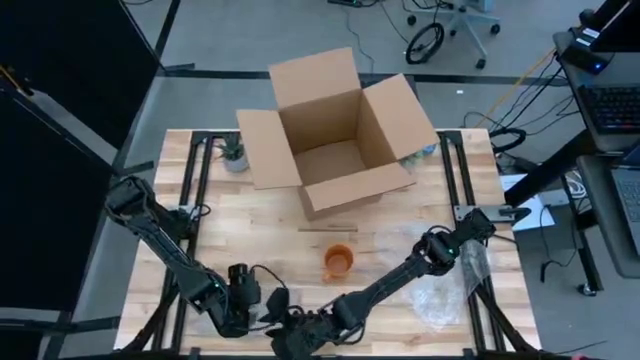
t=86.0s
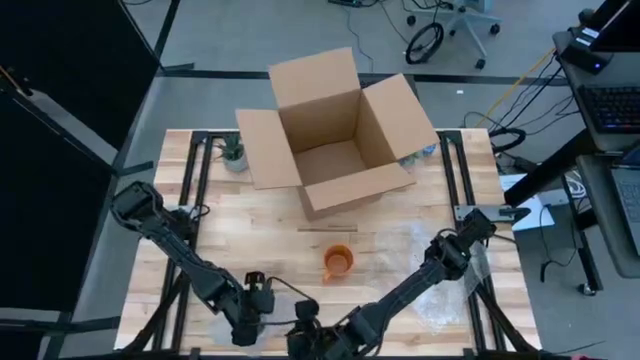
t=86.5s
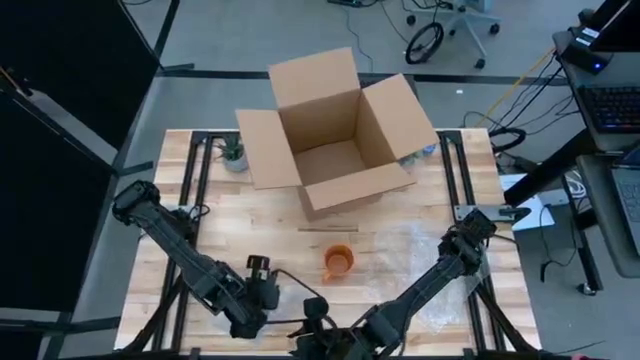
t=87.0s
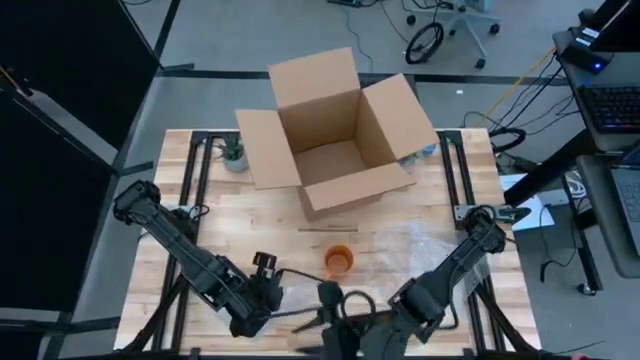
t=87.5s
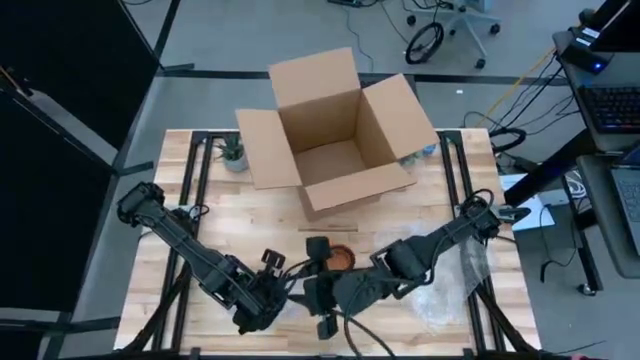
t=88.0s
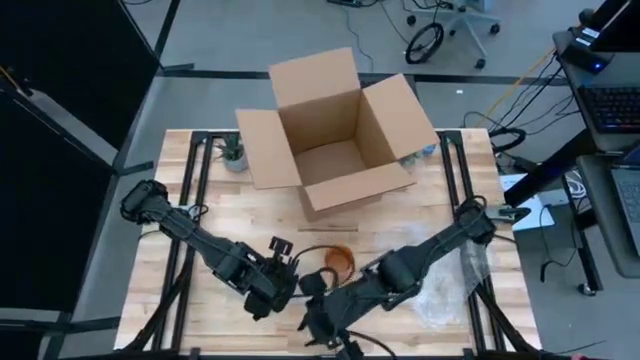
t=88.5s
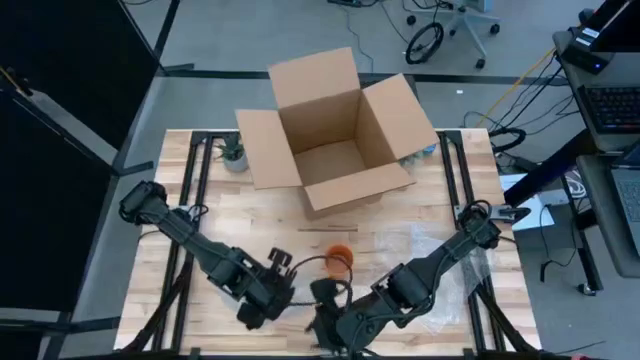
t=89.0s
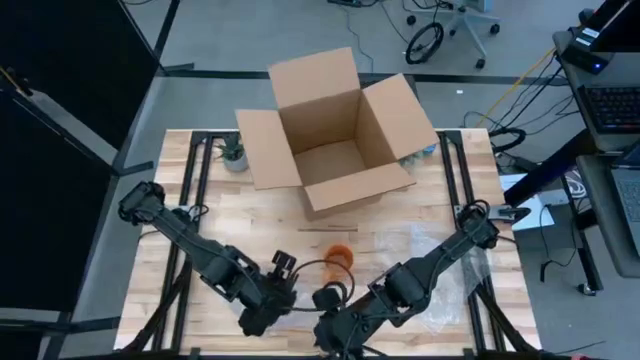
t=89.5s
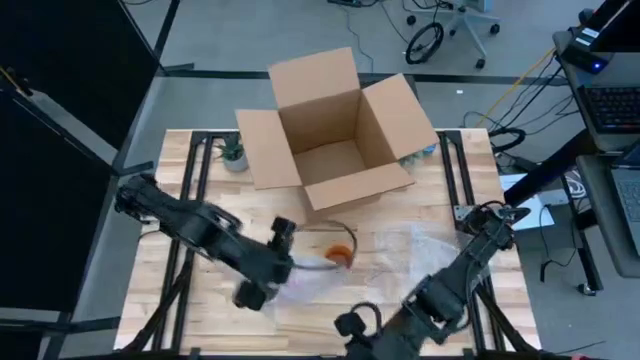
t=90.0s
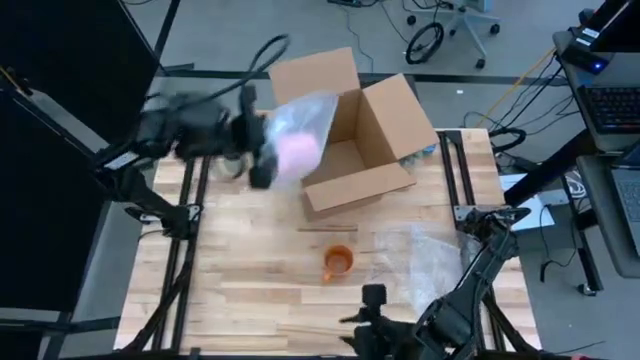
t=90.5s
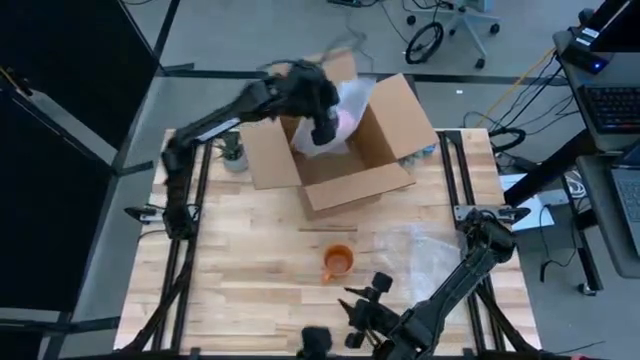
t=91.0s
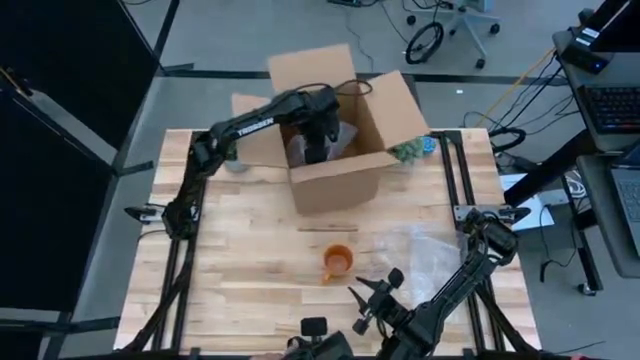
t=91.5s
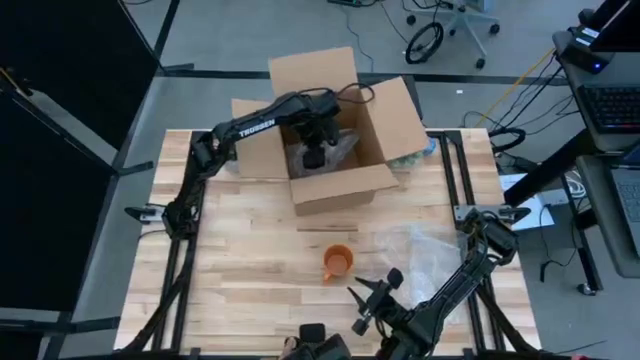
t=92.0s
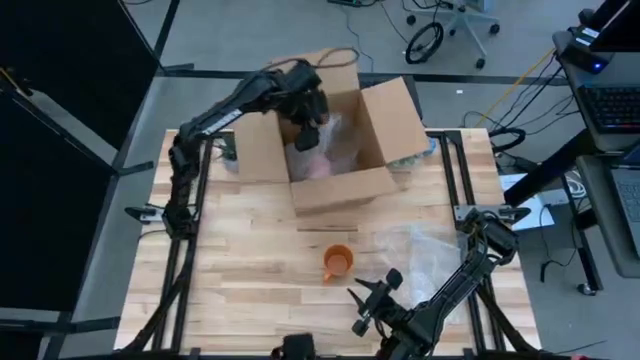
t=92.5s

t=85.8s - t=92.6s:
Task: wrap mug
Put the wrapped pink mug into the brown cardboard box

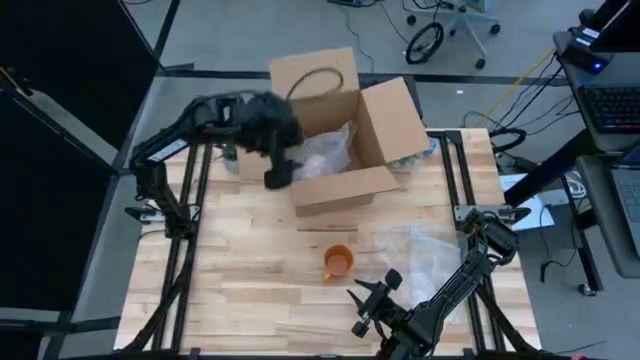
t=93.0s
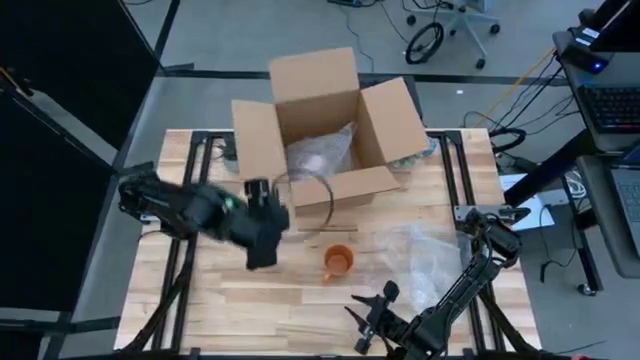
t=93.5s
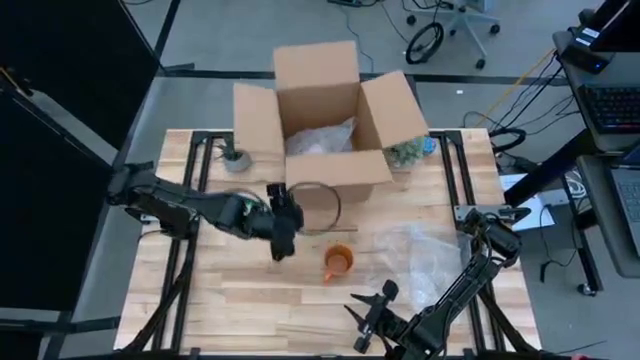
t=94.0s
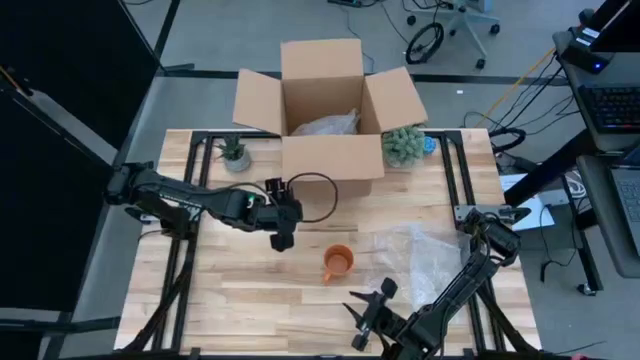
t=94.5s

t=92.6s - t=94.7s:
Adjust the brown cardboard box

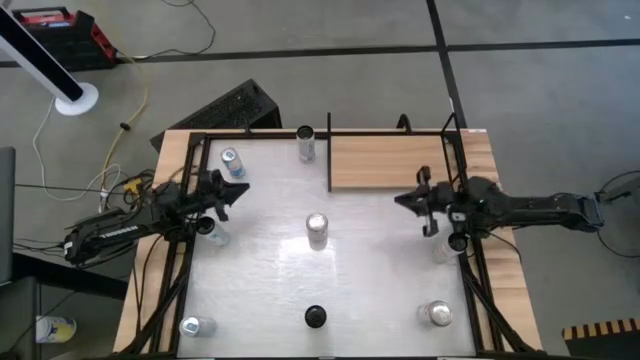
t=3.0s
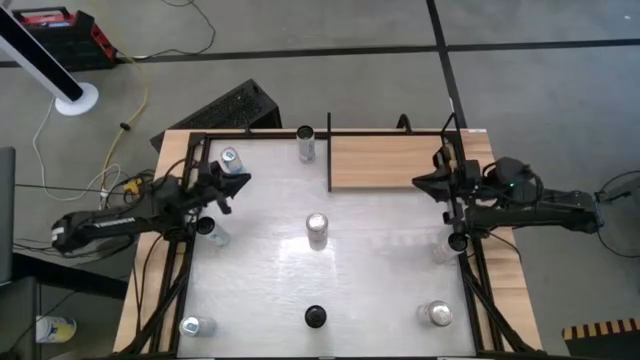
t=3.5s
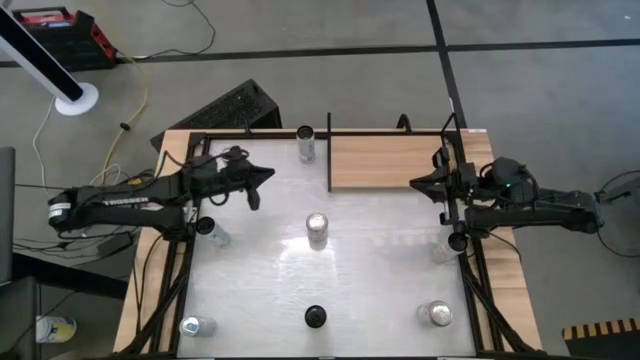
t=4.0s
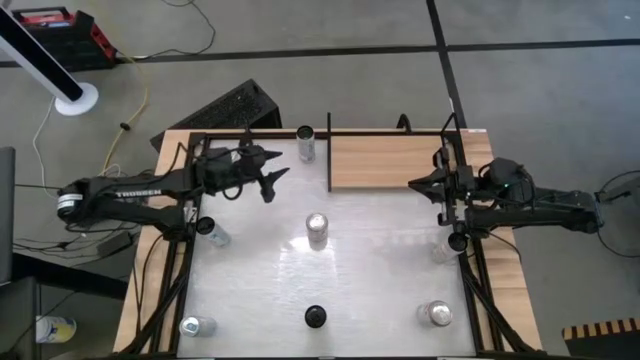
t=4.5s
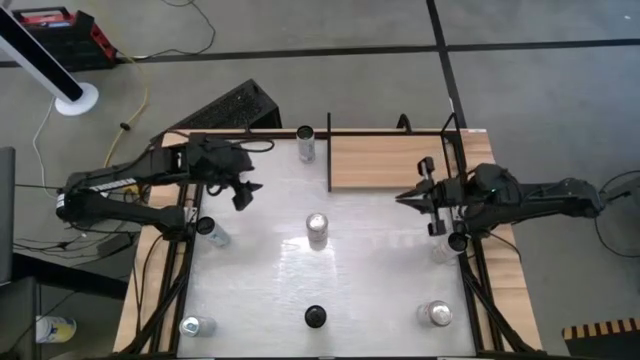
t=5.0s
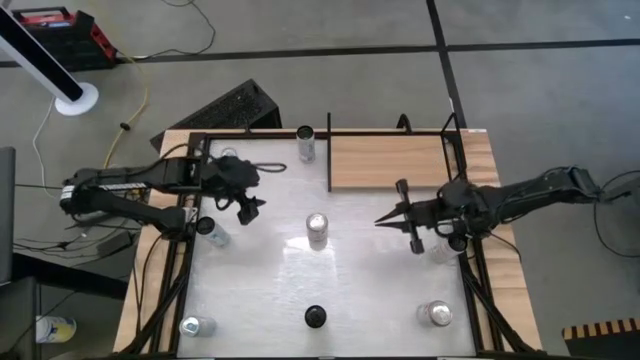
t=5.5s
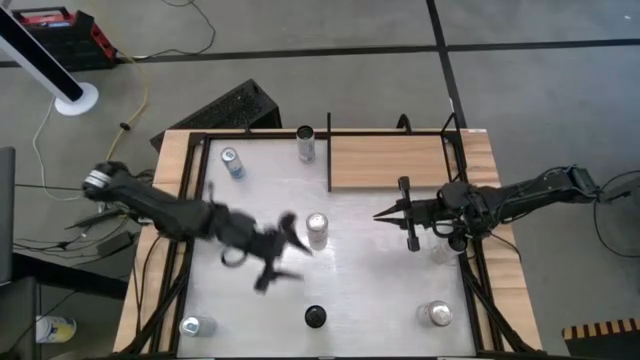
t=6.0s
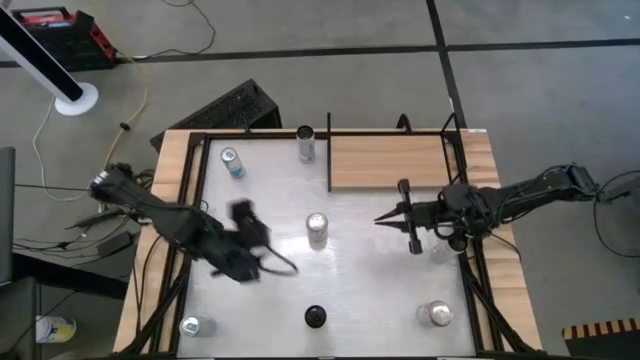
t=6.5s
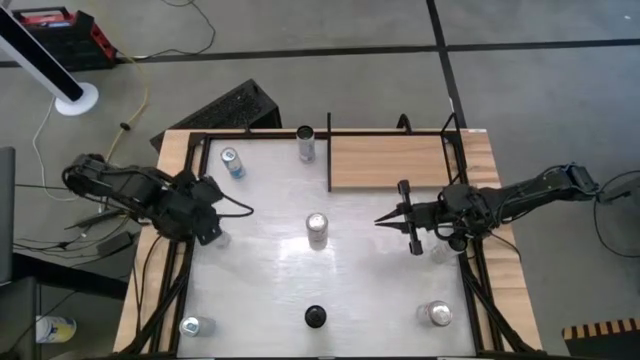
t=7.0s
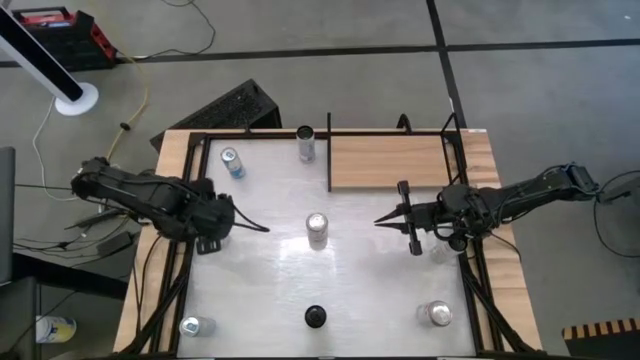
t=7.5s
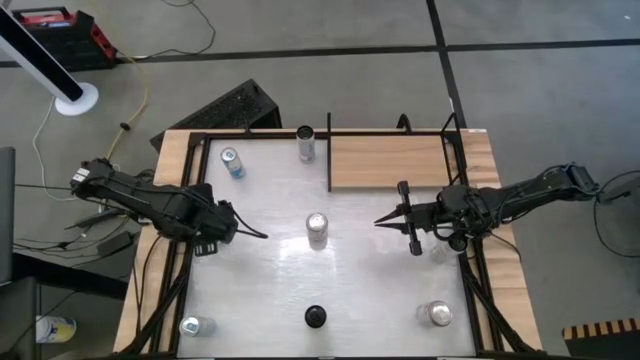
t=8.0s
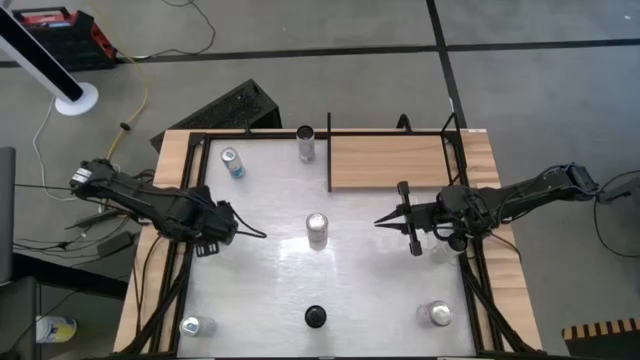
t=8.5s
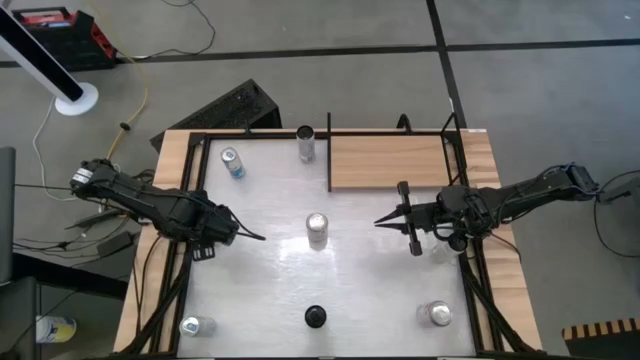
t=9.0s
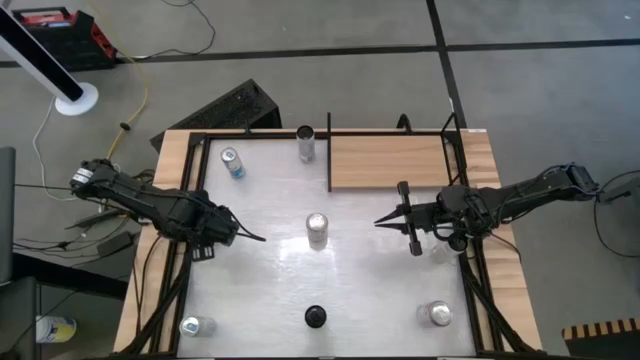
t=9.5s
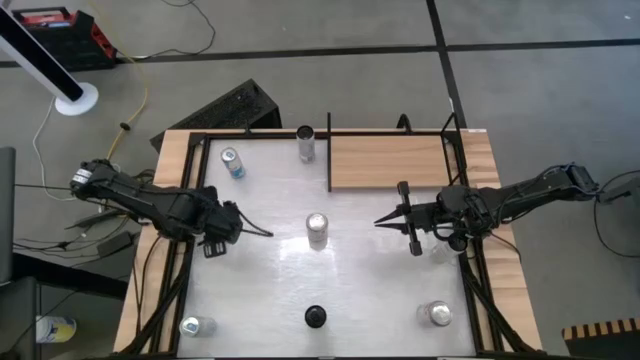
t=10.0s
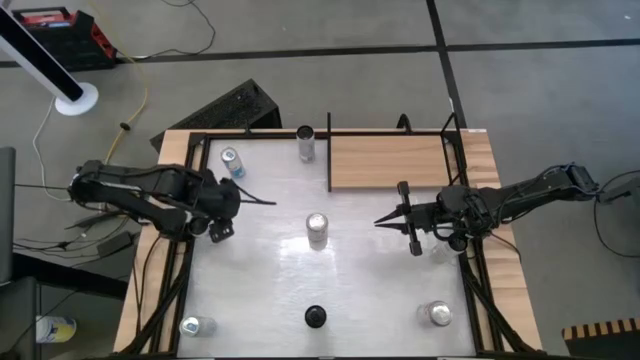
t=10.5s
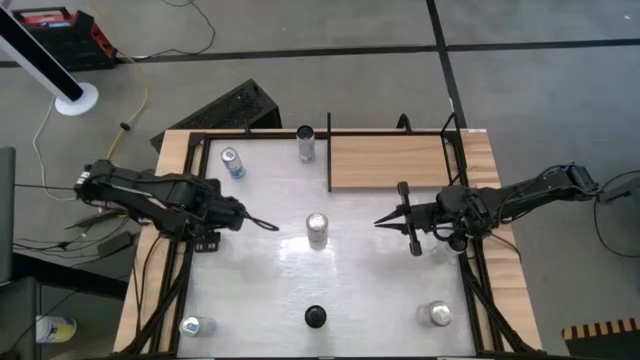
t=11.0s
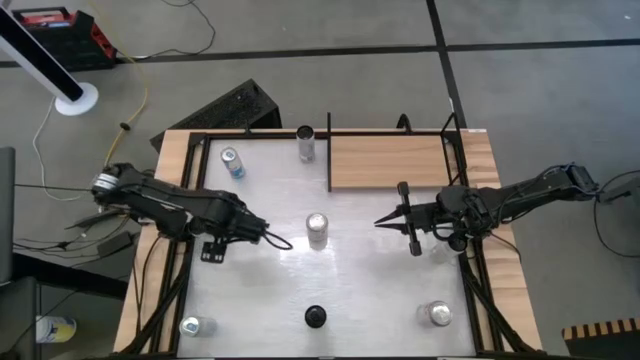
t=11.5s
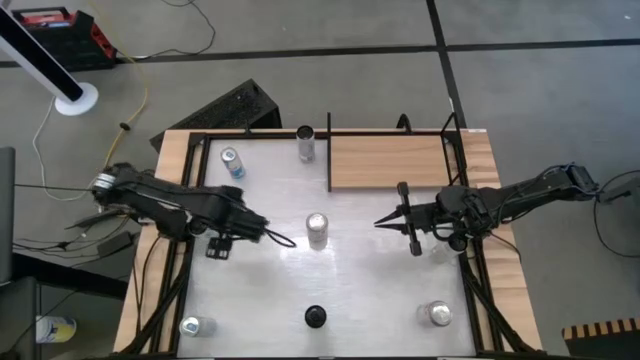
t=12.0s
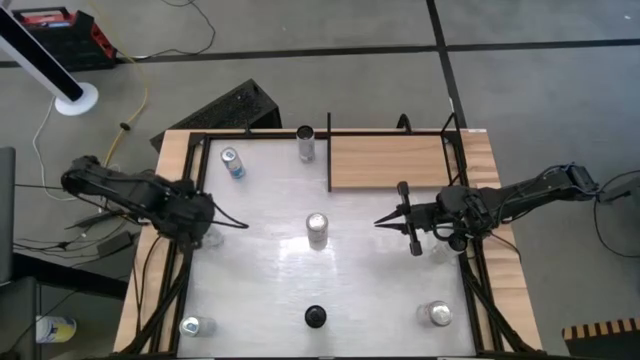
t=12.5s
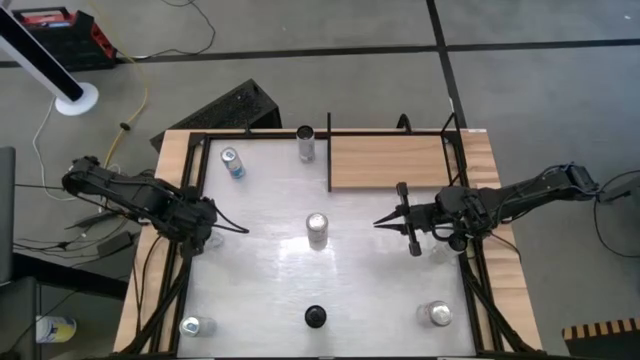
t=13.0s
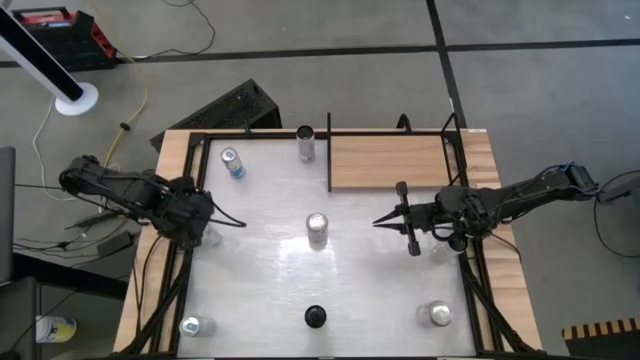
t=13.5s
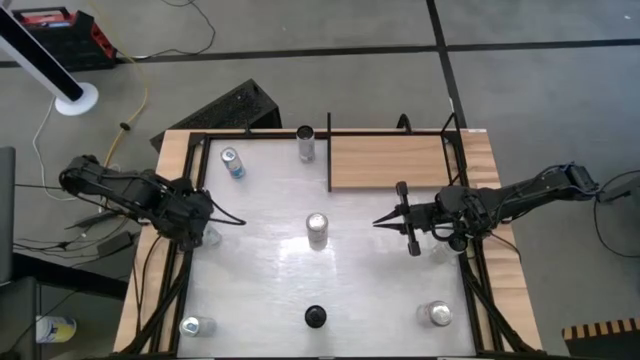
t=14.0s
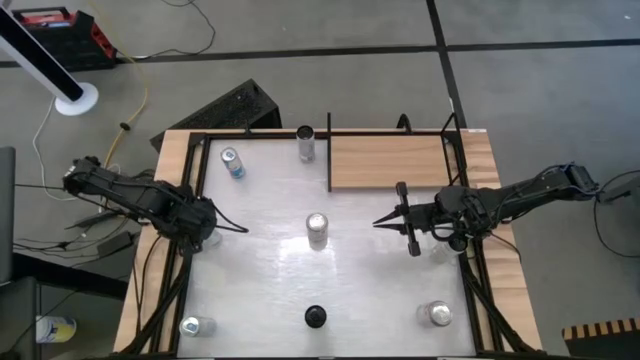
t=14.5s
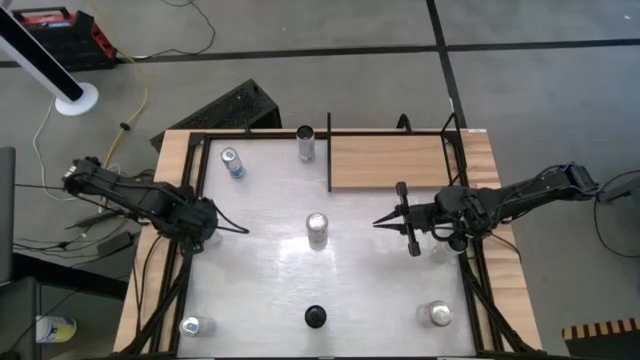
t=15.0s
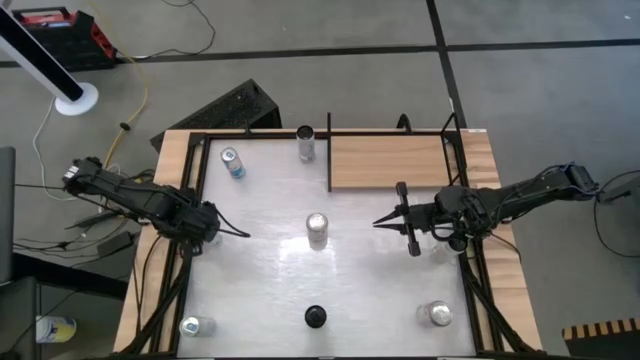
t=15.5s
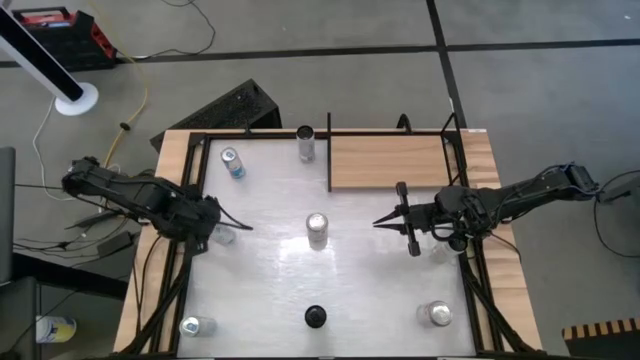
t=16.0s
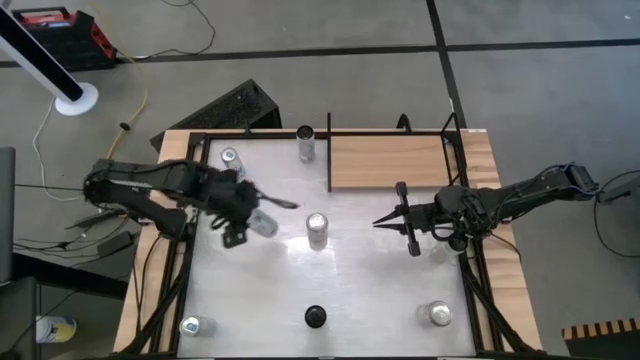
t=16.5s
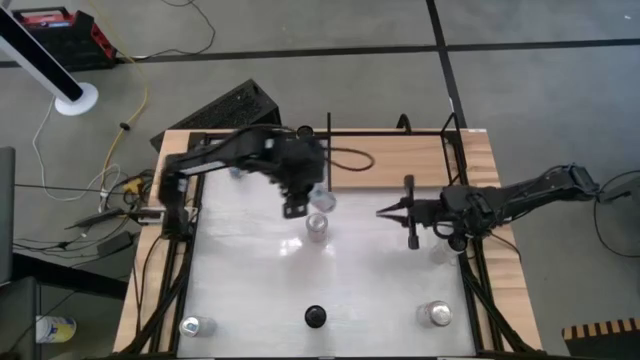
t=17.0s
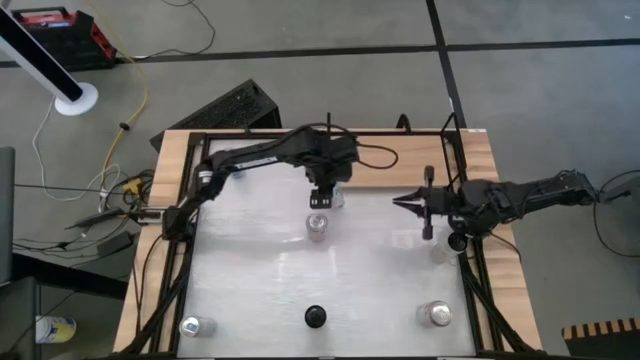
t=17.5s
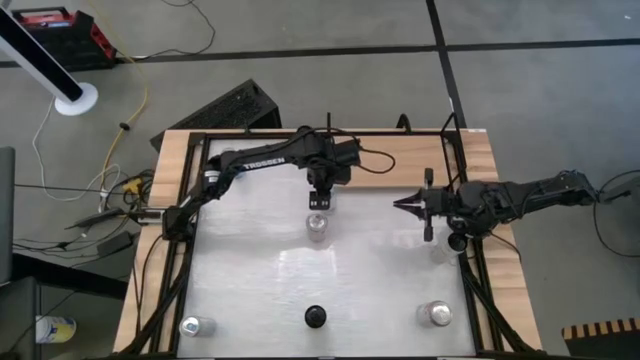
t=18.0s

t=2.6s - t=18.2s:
Task: Place canned beverage on shelf
Put the top white and pink soda can on the shelf
